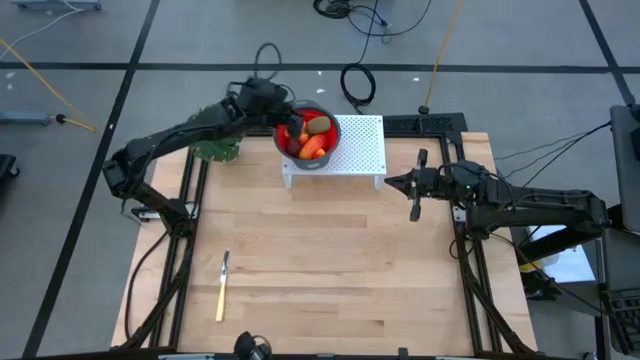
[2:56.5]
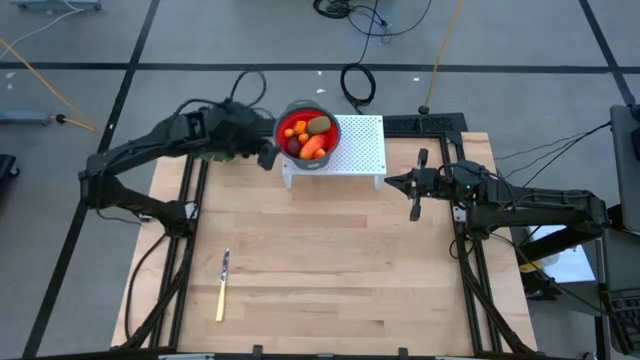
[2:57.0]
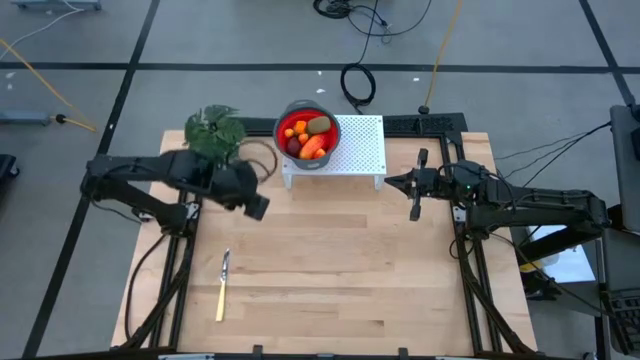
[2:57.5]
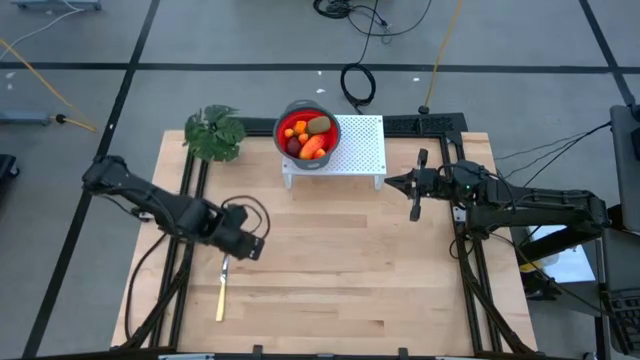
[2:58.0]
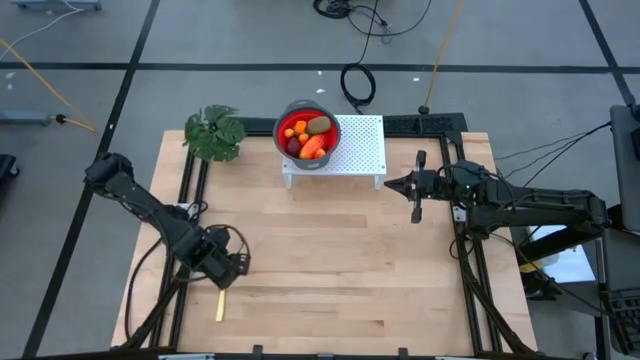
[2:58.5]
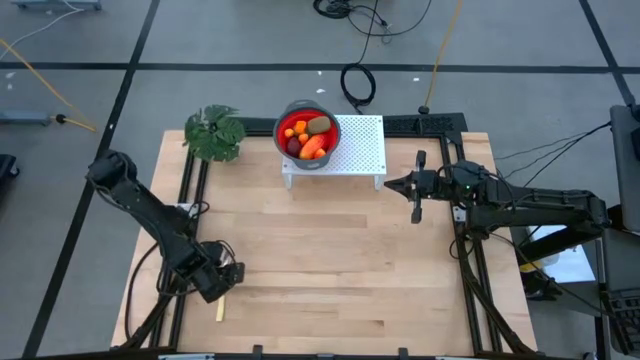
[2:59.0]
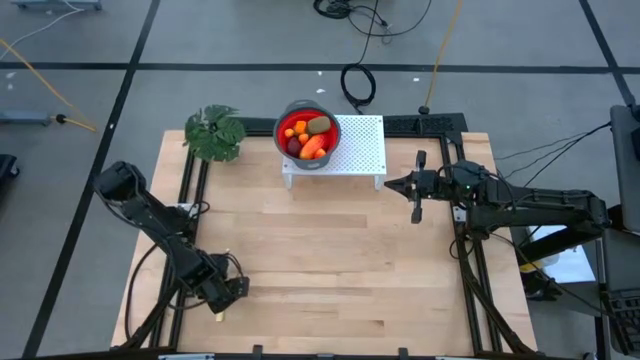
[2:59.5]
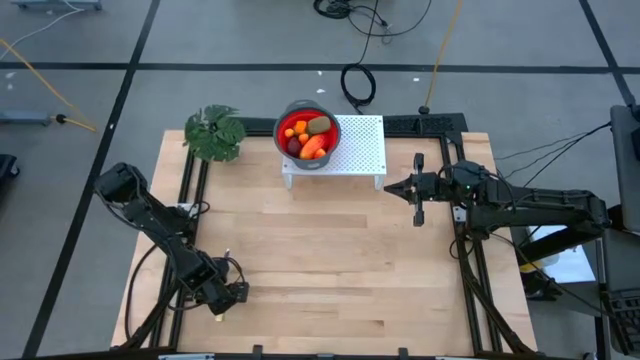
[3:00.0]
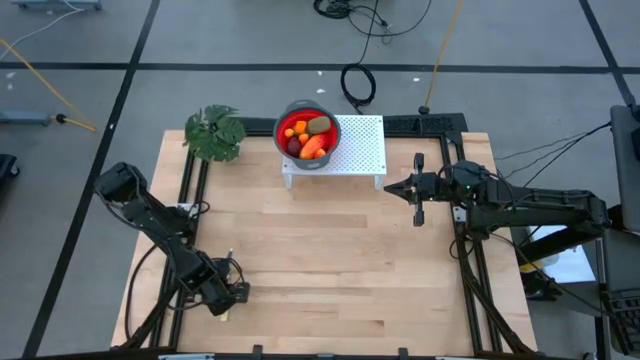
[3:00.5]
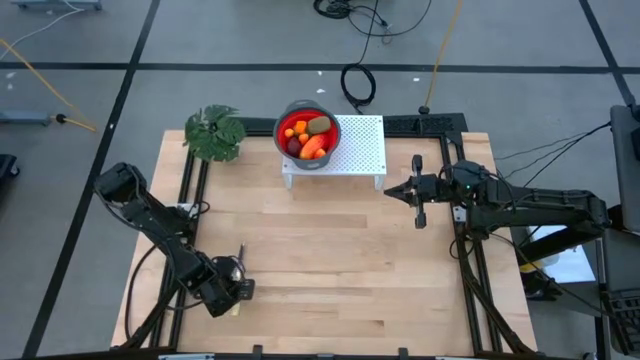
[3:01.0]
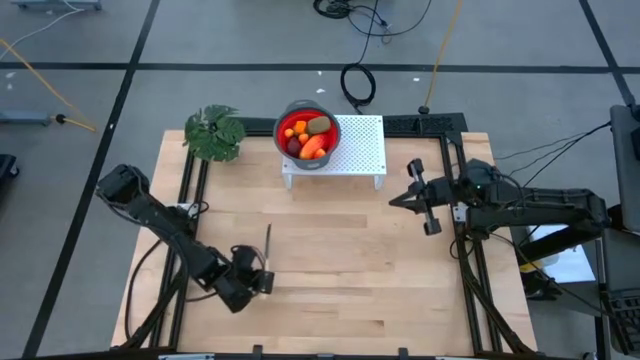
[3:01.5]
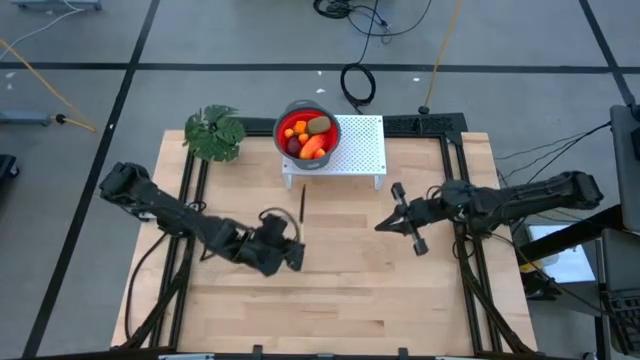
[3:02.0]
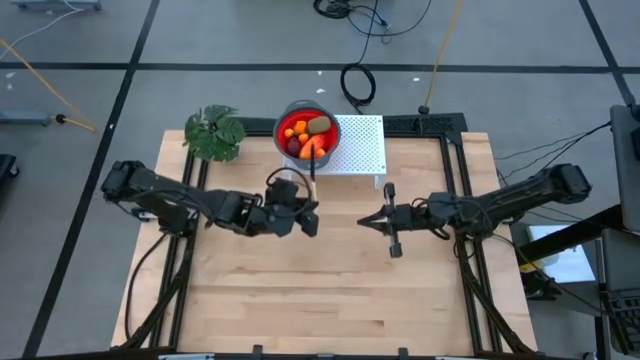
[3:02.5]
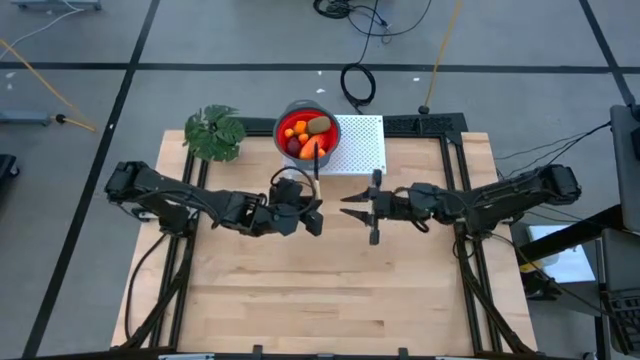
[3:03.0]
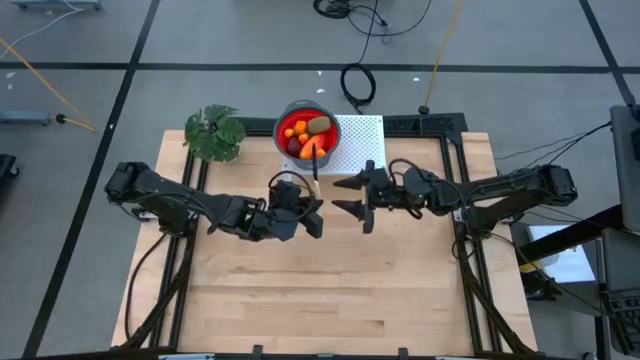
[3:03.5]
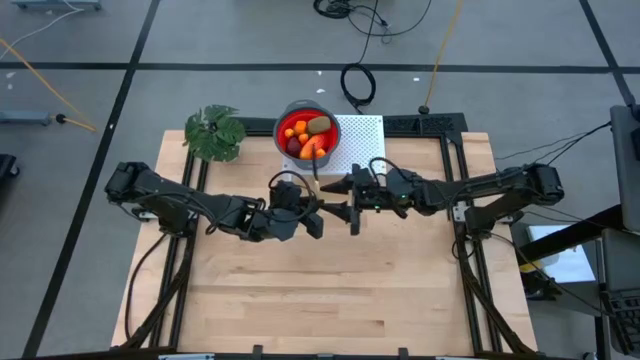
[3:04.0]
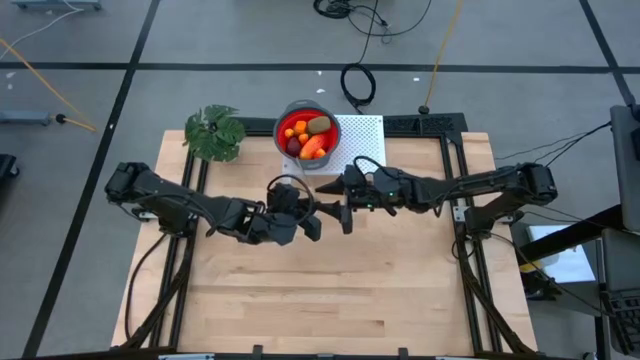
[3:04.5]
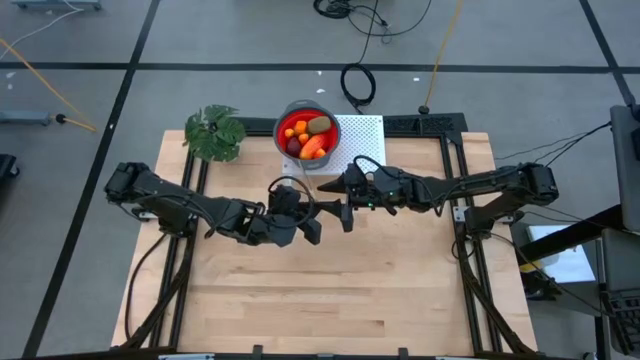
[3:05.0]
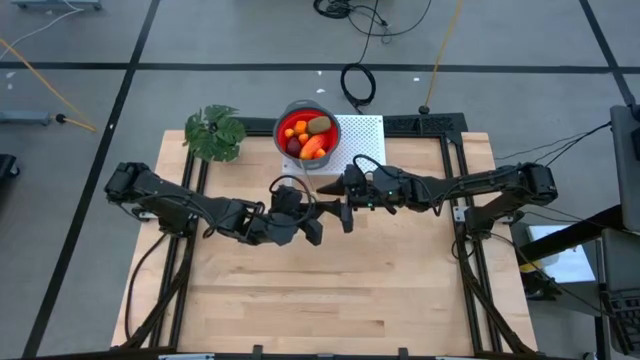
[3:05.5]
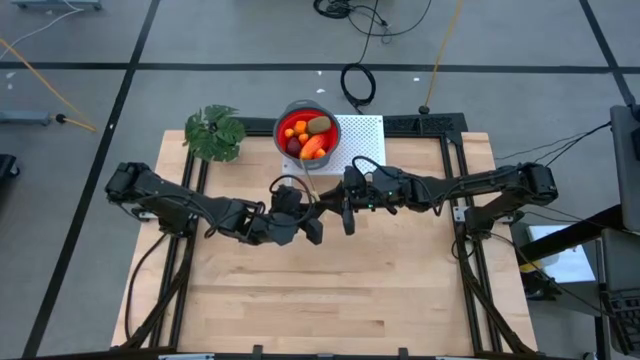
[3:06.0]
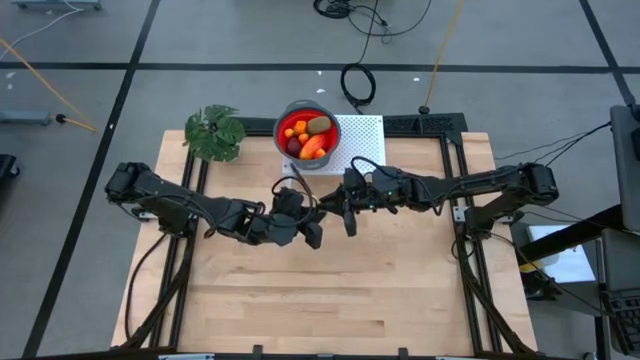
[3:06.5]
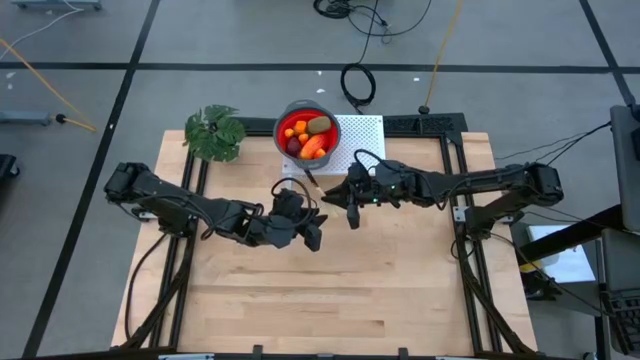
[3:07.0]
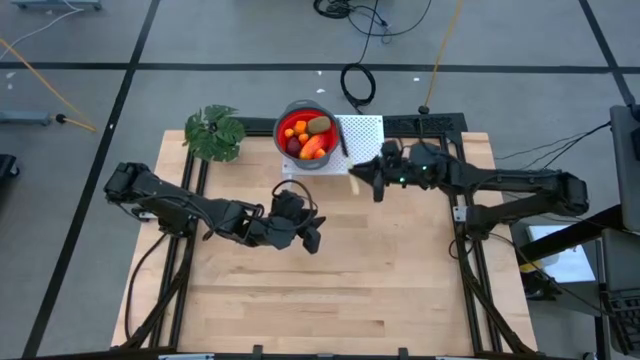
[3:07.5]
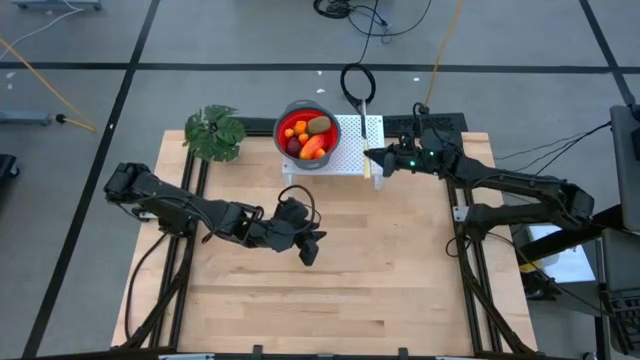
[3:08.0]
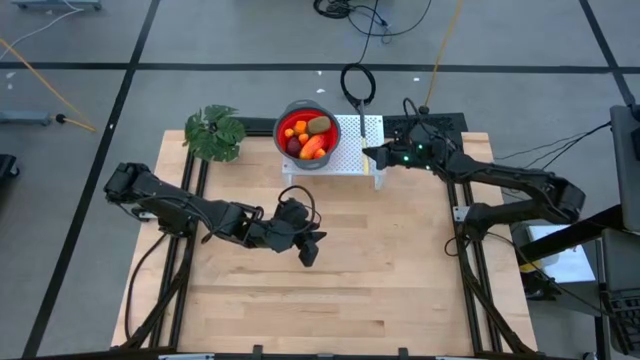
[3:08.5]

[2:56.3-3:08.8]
Task: Pick & Place Fruit
Put the yellow knife on the shelf

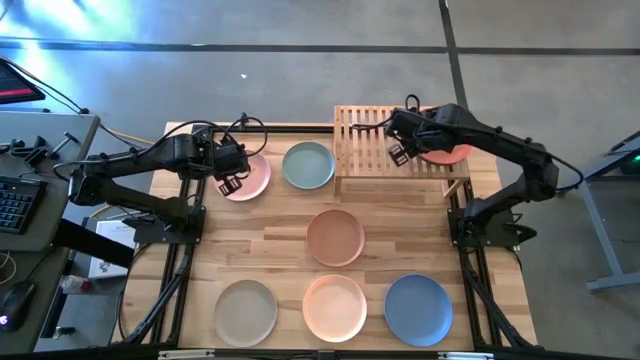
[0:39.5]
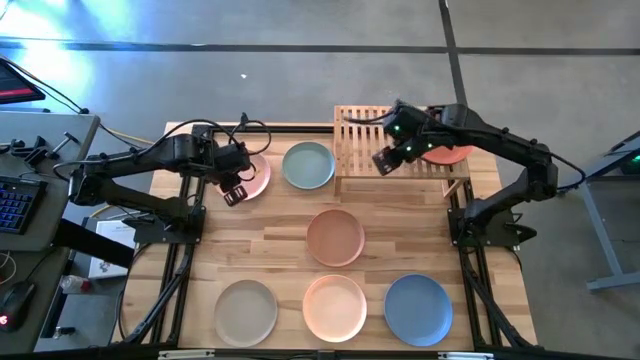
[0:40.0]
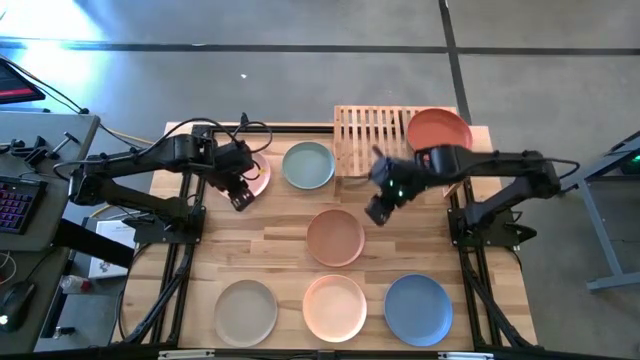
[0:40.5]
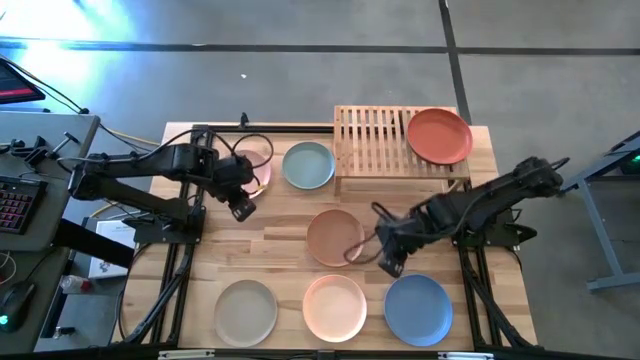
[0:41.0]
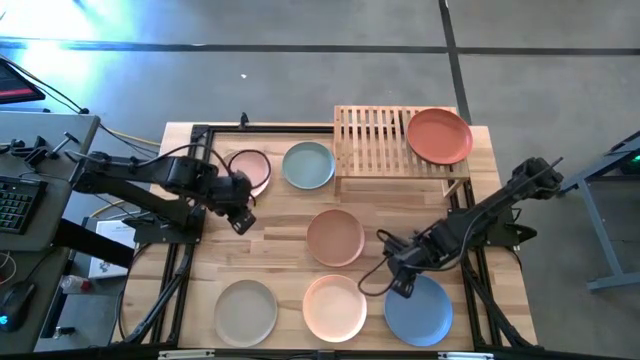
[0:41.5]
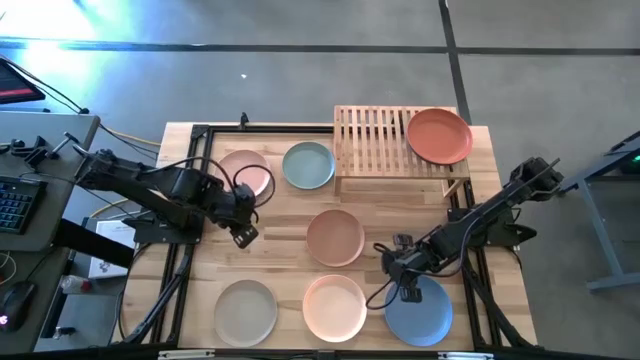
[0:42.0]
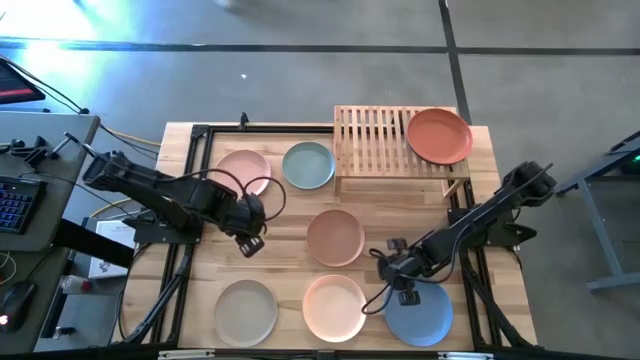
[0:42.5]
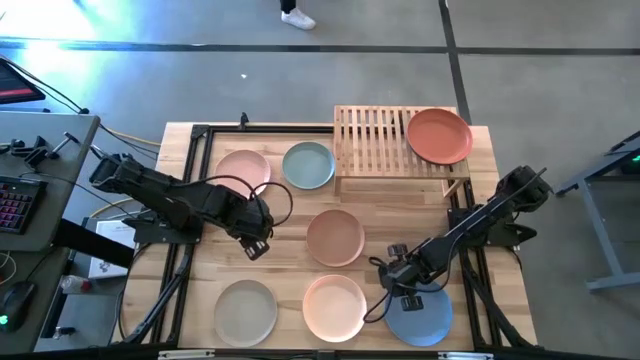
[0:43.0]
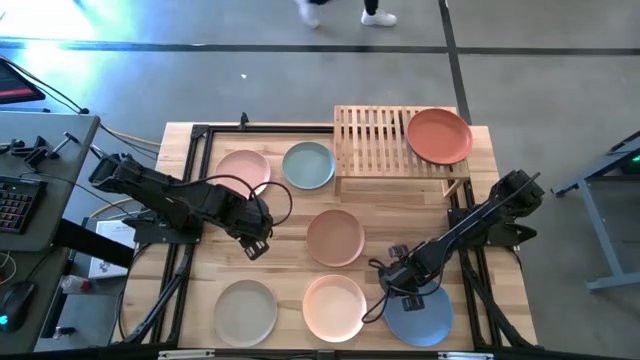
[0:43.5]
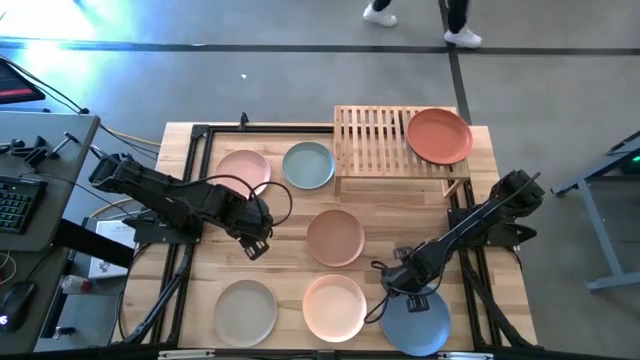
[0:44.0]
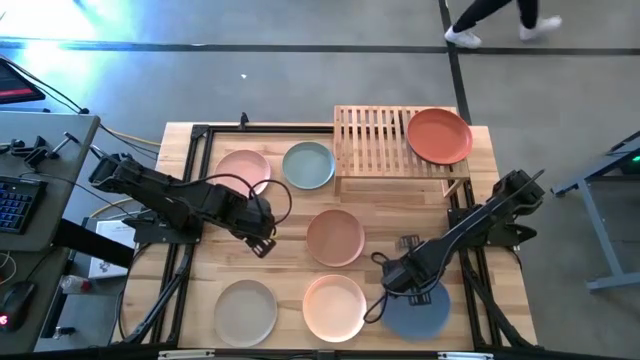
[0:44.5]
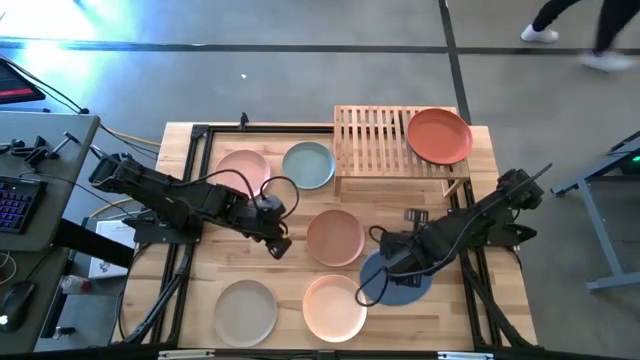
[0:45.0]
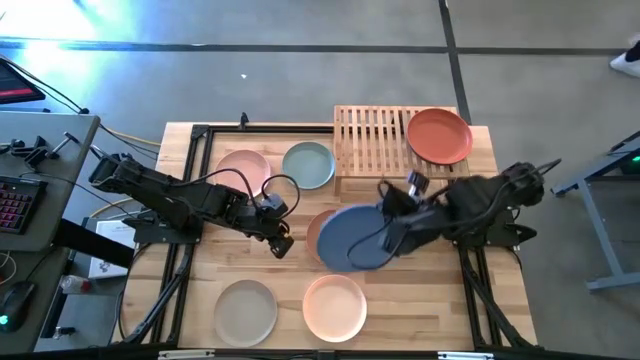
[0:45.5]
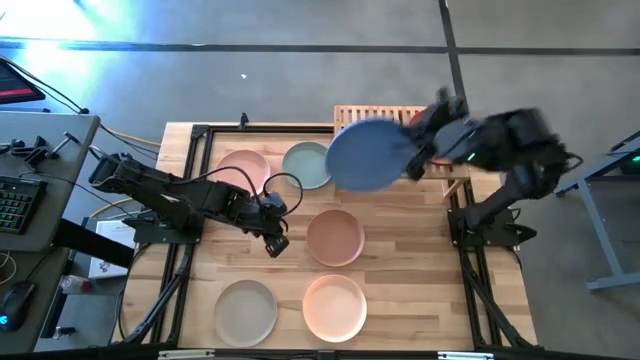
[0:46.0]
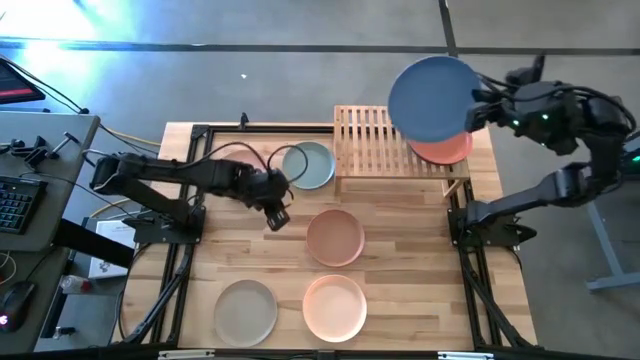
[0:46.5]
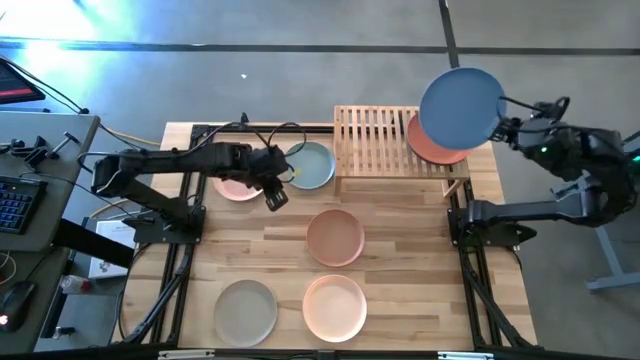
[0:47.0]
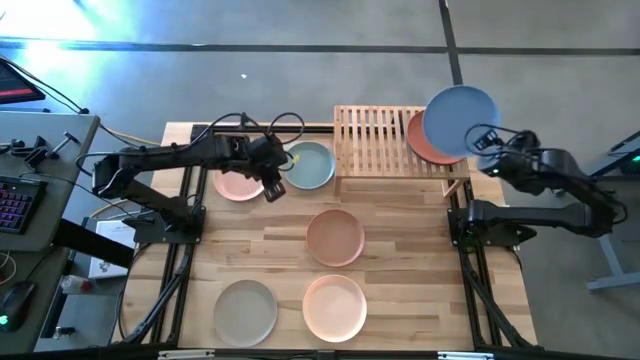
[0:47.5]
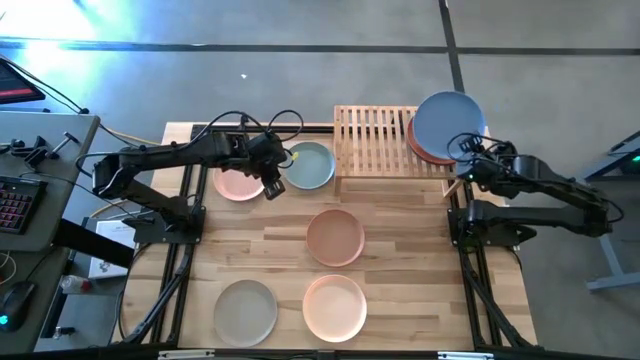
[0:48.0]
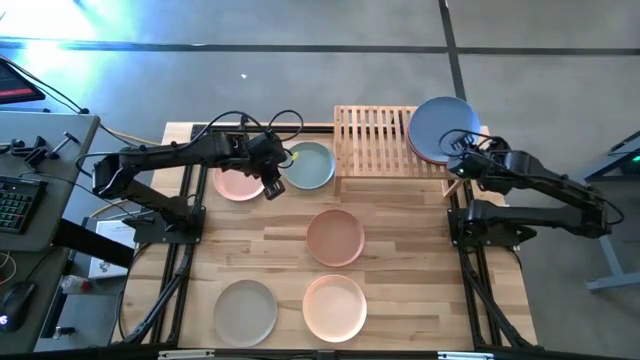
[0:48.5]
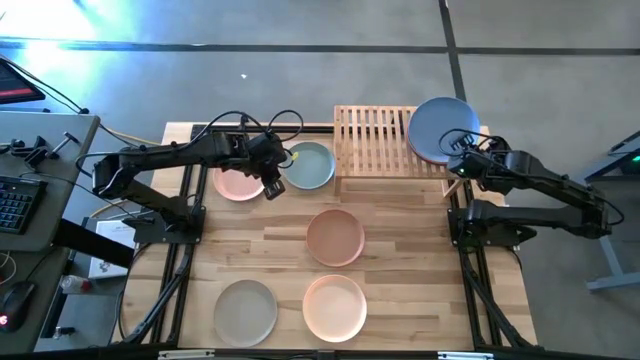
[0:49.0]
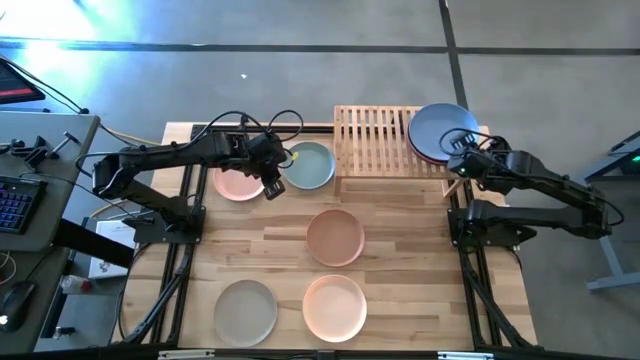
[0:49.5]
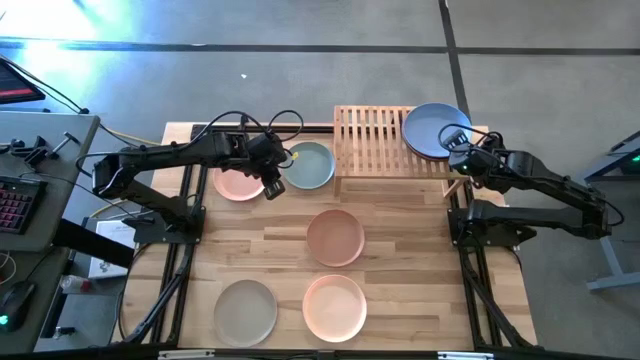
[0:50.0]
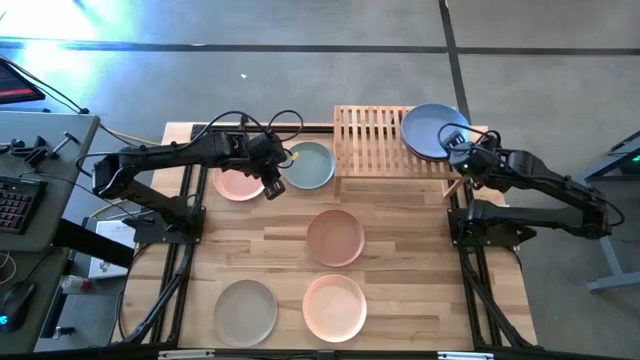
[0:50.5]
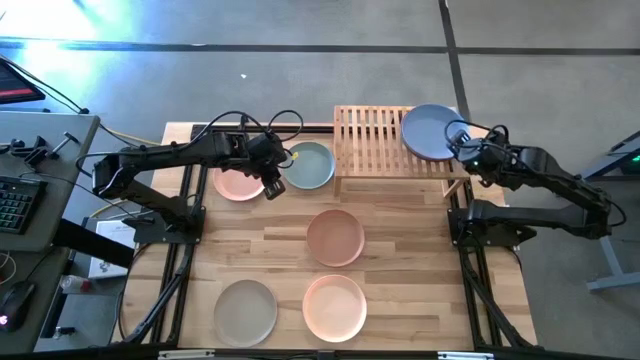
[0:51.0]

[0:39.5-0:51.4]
Task: Place and stack plates onto a shelf
Stack the blue plate on top of the orange plate on the shelf
